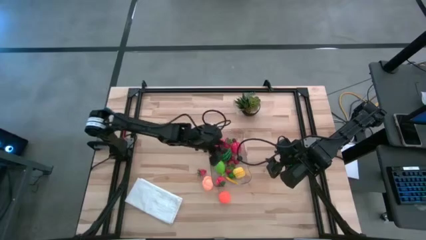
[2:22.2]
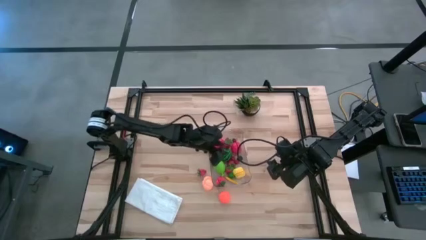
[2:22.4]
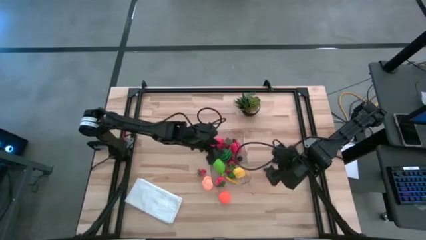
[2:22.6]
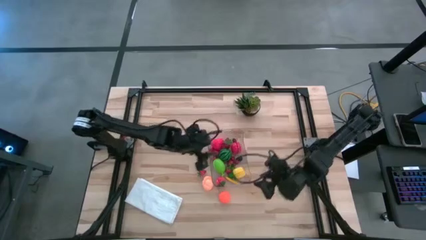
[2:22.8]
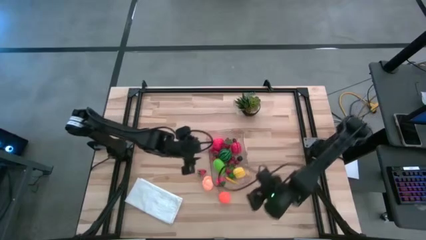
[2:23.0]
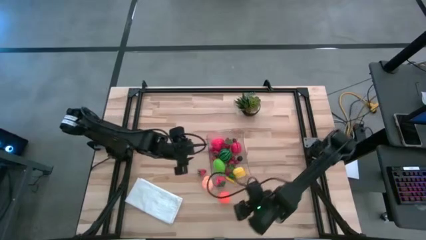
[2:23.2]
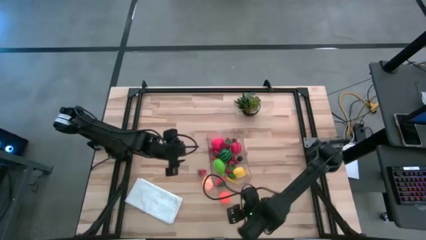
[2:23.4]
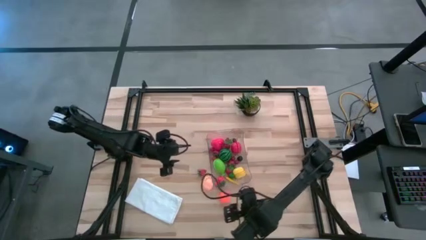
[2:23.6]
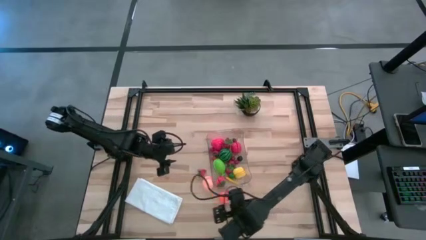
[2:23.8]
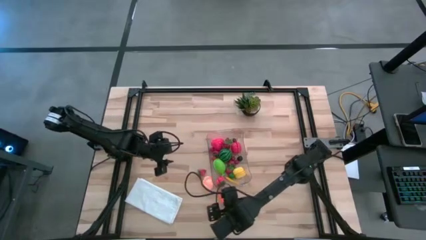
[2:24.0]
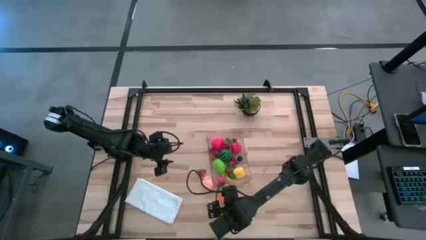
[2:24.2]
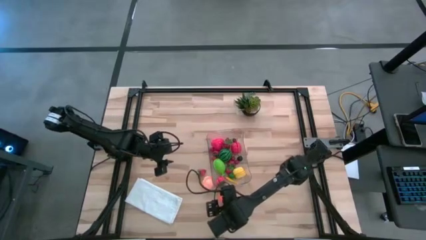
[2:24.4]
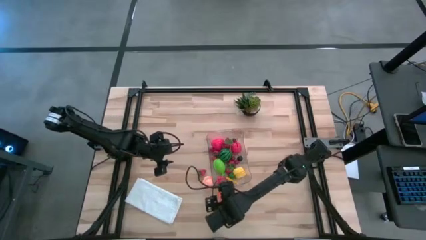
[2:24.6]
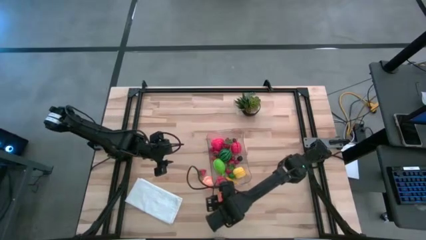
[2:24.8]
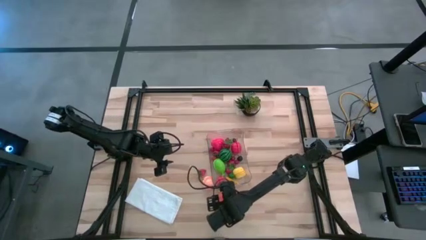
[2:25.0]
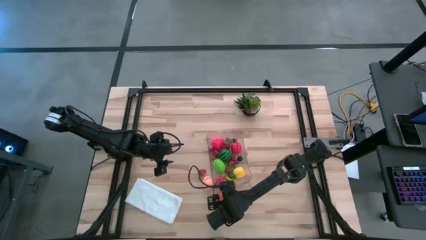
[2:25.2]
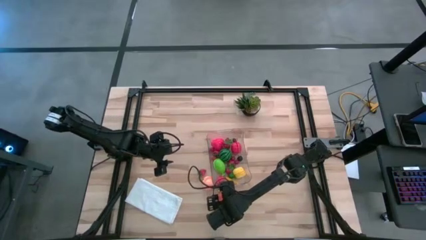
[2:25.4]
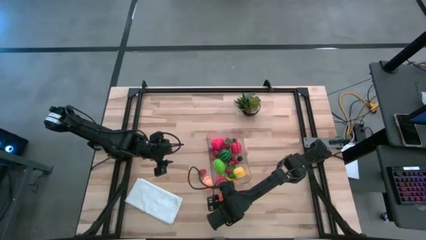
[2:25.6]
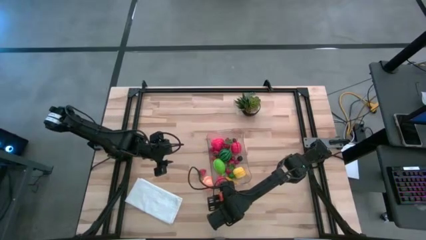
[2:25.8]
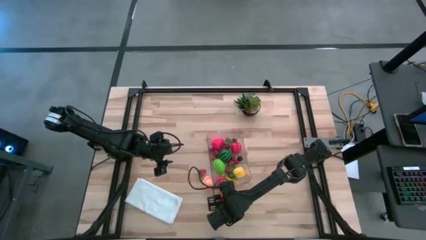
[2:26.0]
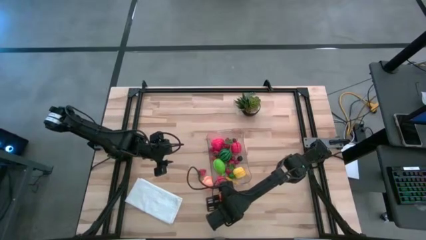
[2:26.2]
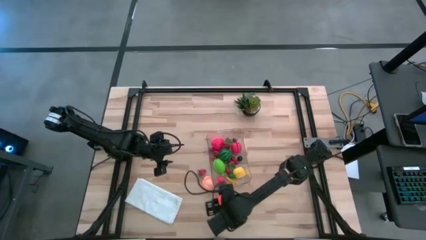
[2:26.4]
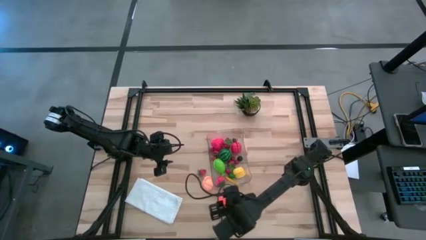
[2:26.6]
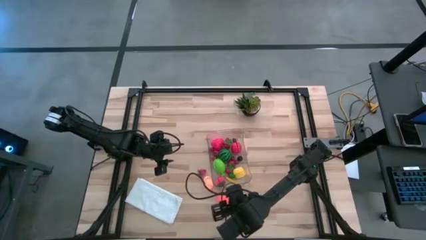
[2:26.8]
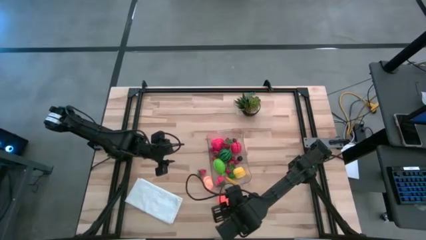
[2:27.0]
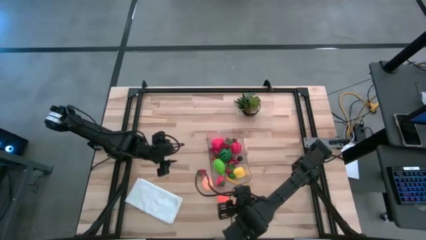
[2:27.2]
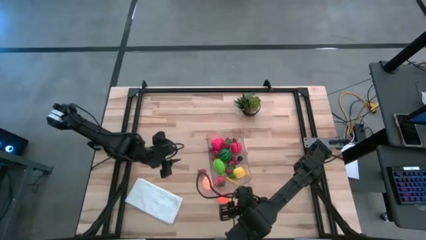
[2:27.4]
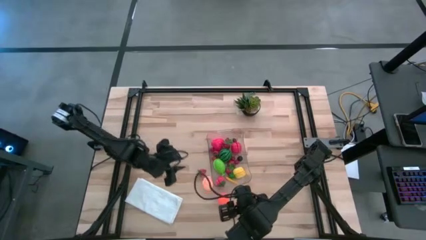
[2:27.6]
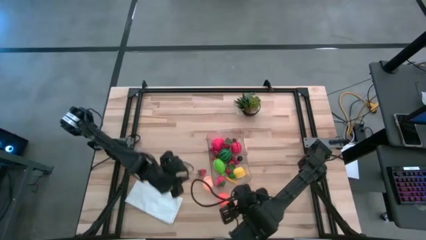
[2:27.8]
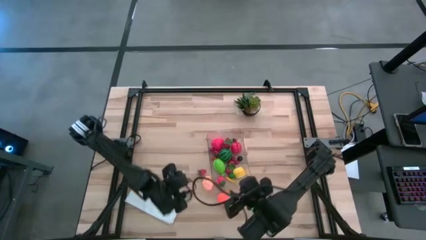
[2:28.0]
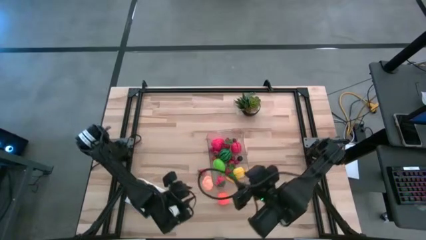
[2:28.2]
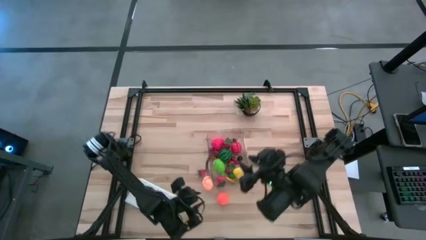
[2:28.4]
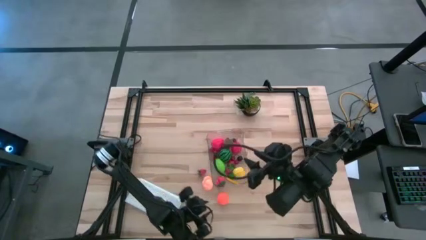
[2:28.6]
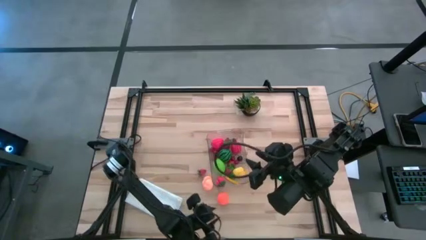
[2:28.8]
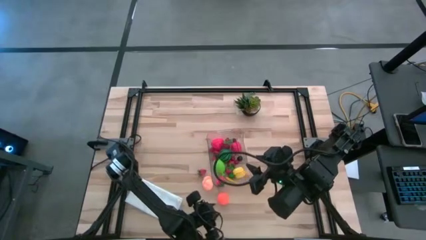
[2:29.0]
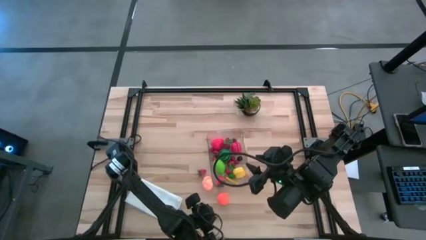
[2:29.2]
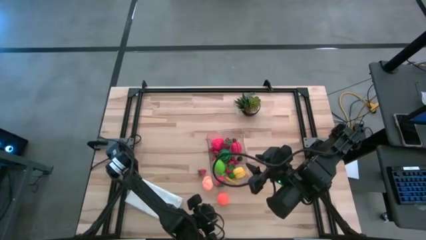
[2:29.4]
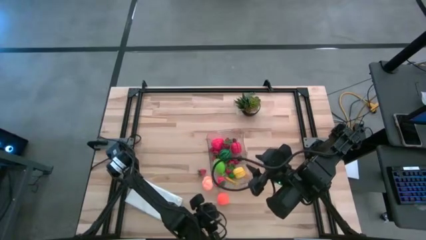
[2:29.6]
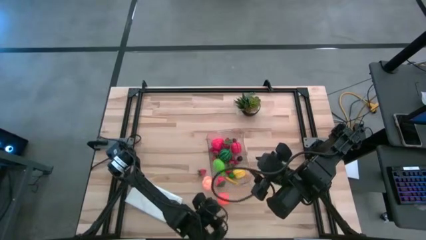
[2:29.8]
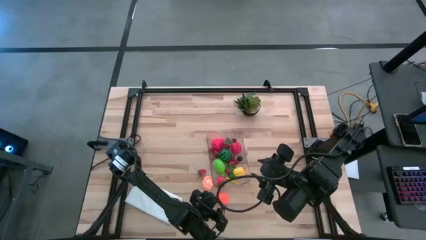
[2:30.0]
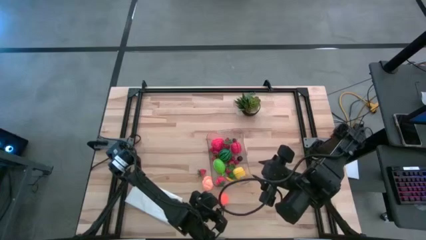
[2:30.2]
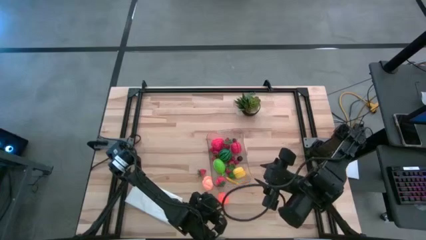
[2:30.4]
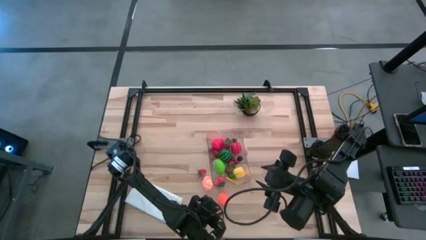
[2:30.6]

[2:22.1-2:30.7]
Task: Pick and placing Produce into tupperware
Put the orange pumpkin into the transparent bin

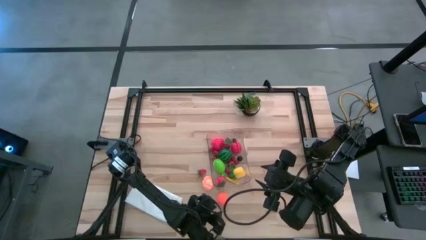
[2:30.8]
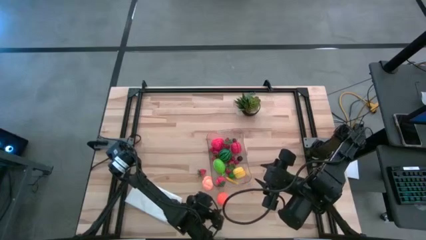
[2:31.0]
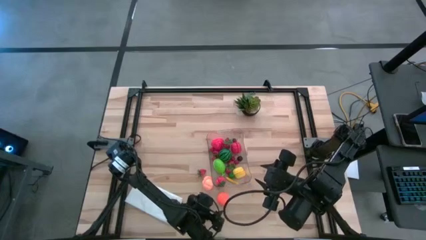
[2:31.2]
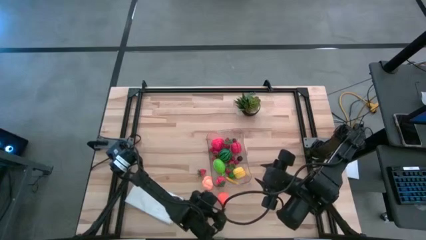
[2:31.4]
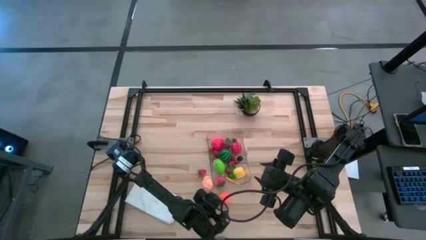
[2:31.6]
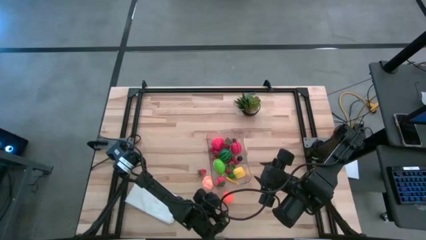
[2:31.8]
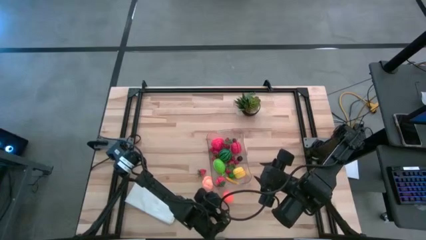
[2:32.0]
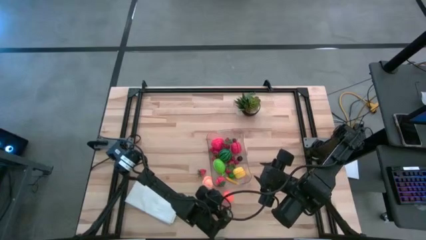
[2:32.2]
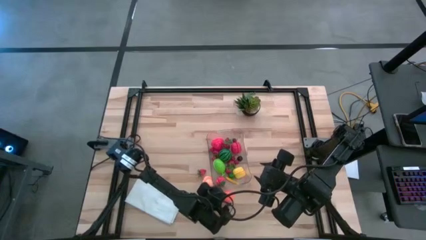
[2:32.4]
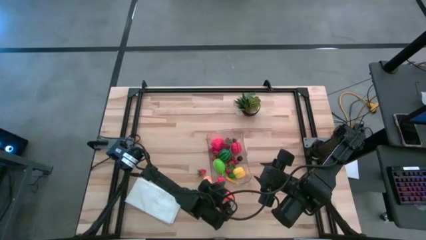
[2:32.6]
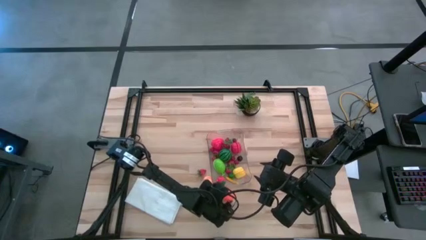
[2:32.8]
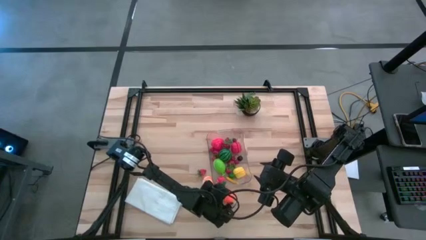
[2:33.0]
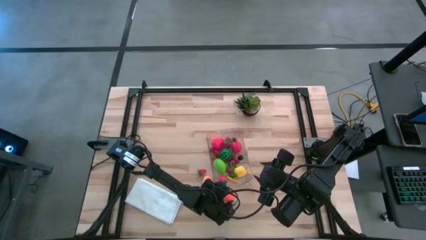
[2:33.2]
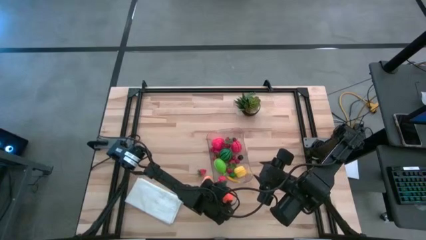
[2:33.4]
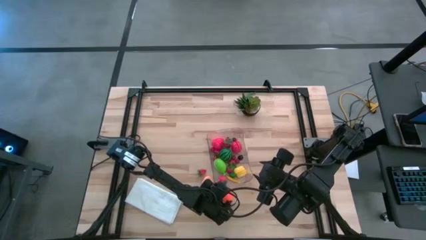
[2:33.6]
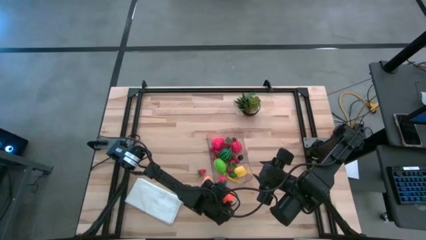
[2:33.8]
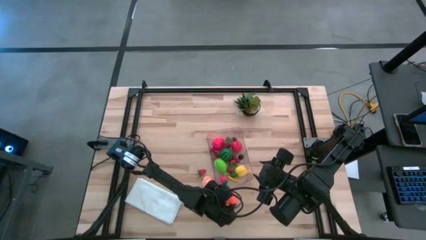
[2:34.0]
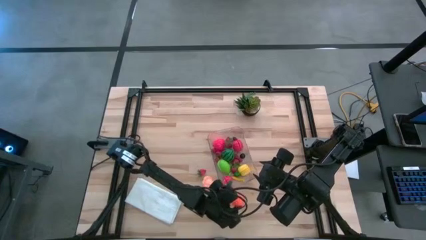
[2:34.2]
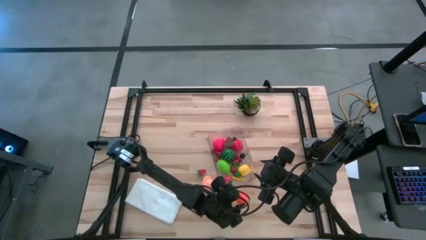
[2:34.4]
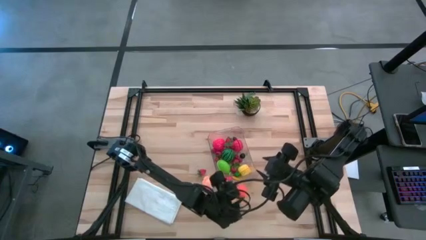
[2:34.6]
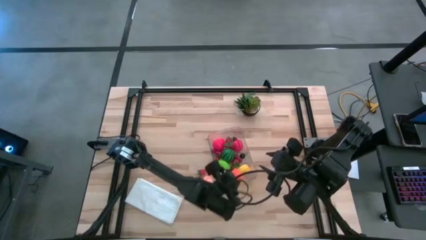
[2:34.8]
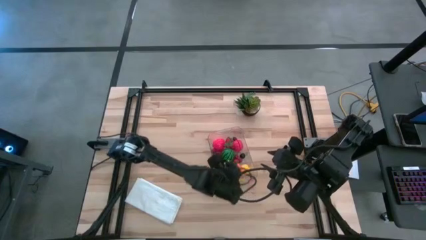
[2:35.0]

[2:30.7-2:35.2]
Put the orange pumpkin into the transparent bin

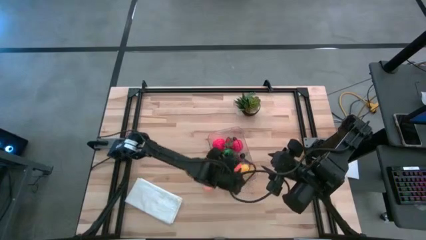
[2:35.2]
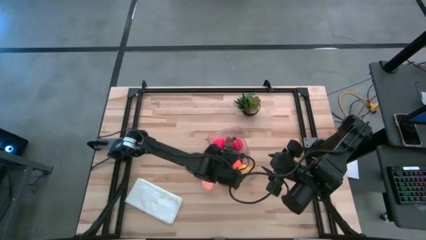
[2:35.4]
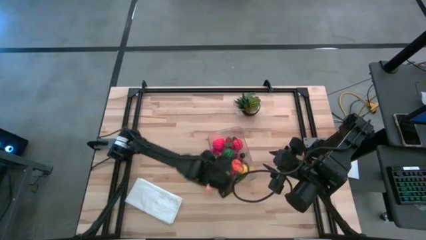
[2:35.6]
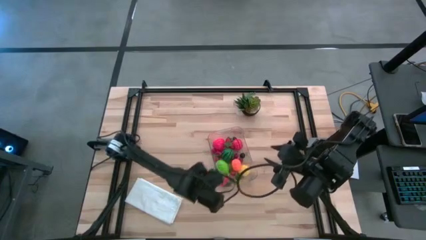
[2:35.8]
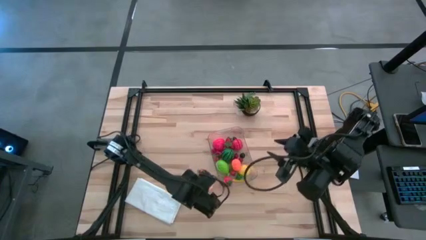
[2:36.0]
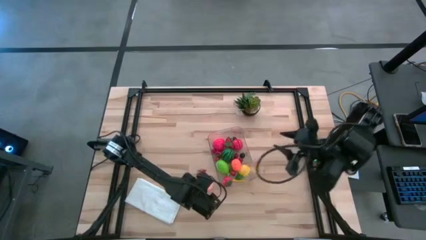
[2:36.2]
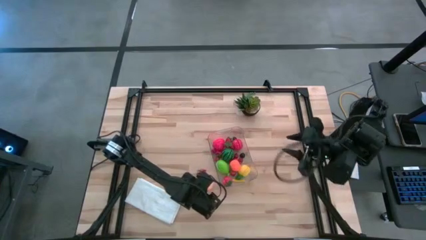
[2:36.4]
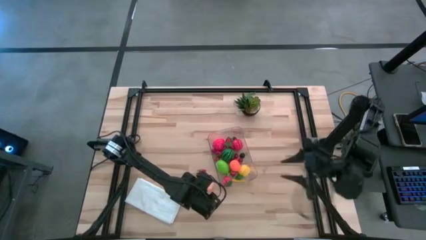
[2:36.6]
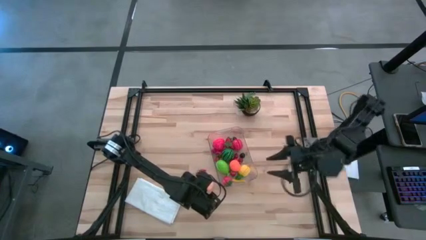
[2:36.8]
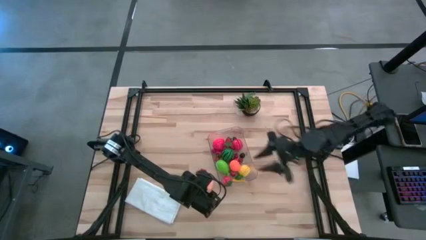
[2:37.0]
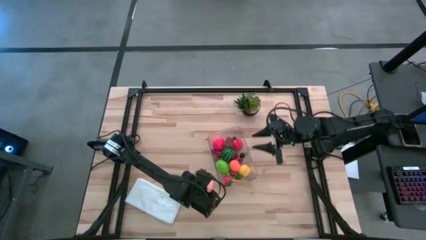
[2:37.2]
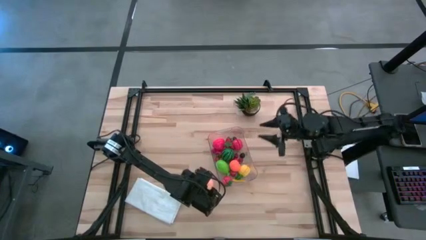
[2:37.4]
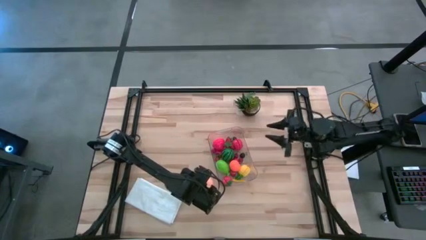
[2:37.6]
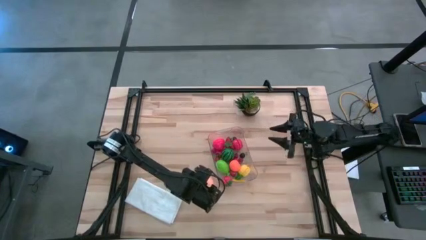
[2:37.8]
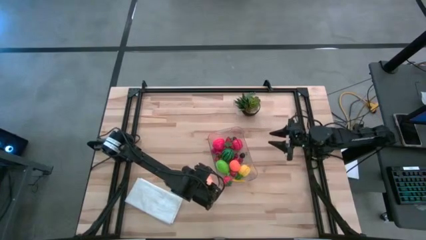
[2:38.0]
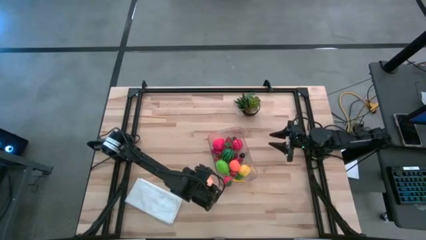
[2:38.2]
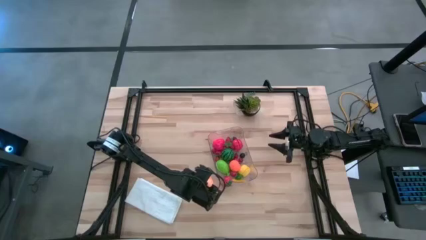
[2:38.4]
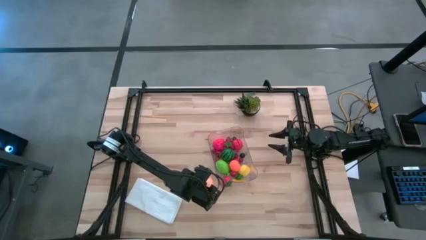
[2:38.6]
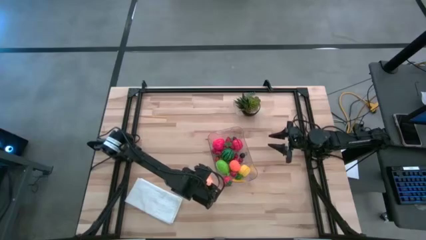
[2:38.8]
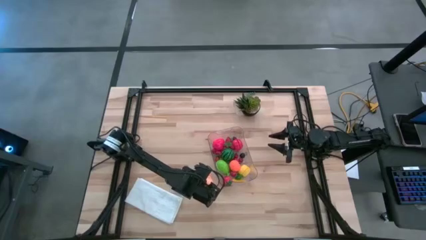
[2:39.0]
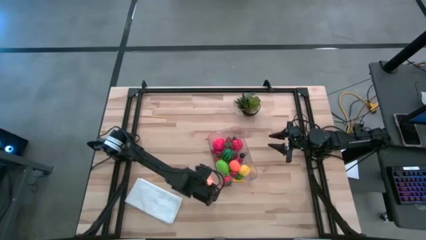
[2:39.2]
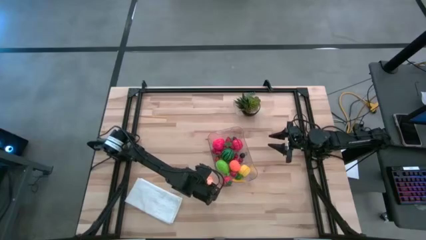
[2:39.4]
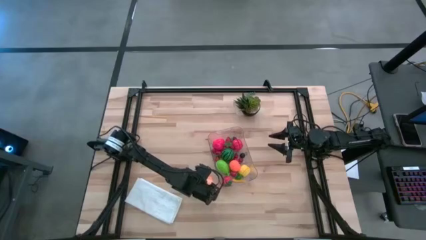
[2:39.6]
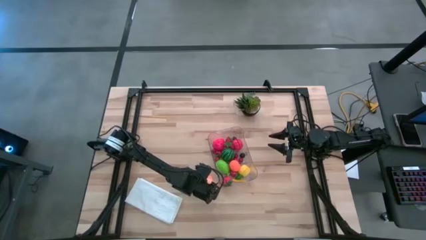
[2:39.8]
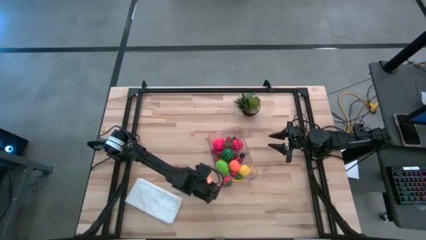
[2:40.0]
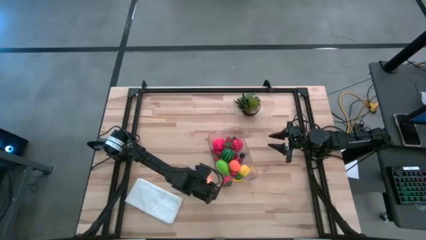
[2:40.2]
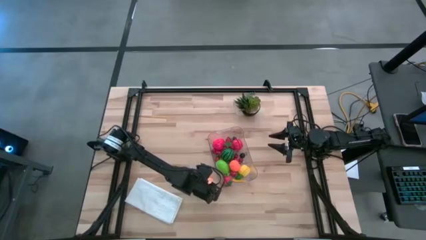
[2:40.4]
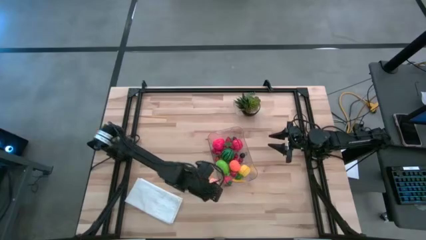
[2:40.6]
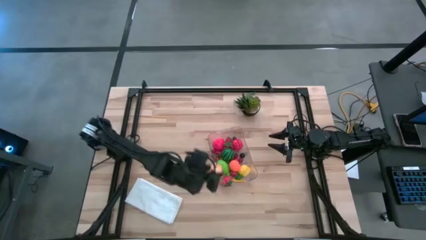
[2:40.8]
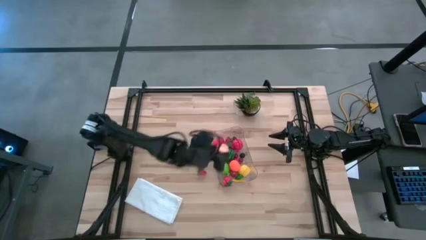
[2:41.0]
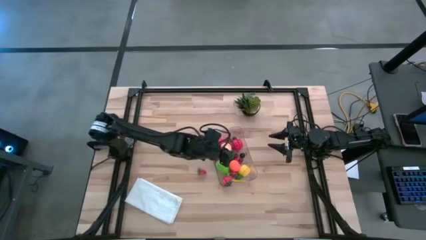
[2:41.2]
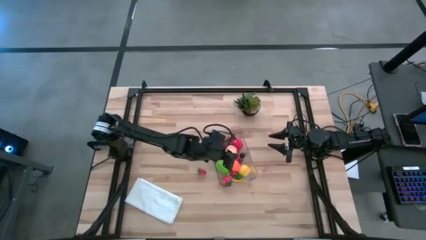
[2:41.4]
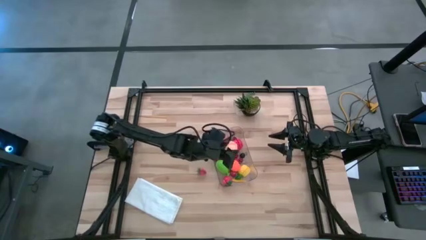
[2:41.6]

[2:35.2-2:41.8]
Put the light orange peach into the transparent bin
